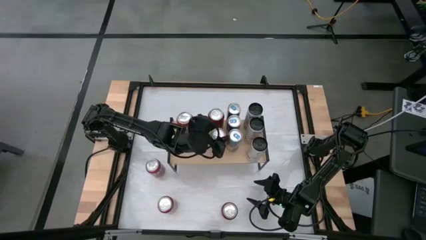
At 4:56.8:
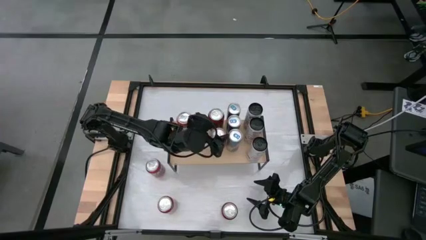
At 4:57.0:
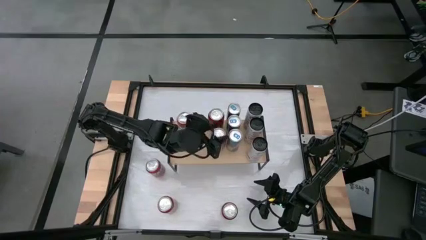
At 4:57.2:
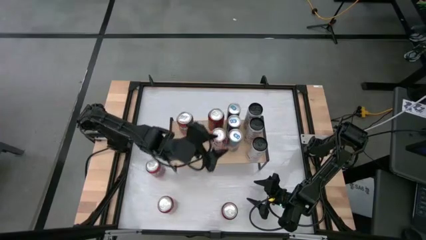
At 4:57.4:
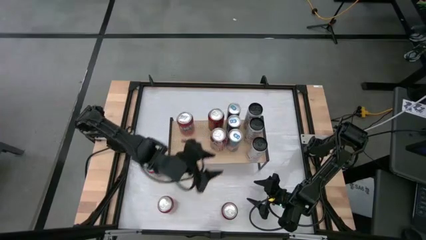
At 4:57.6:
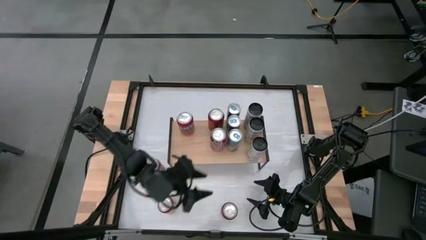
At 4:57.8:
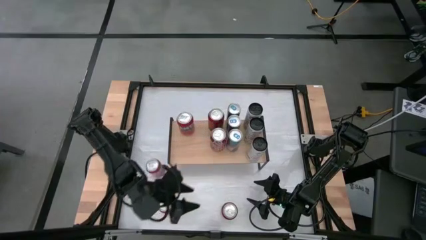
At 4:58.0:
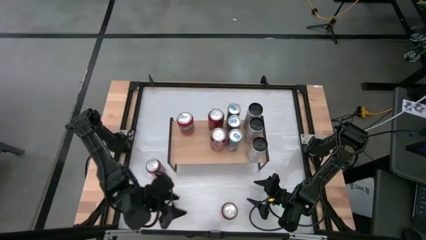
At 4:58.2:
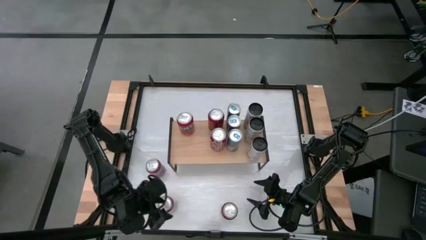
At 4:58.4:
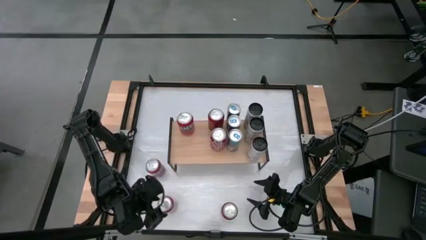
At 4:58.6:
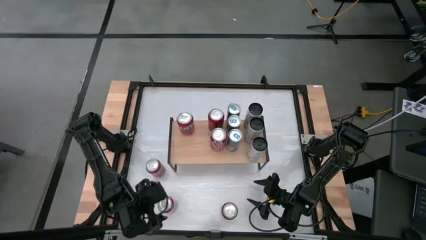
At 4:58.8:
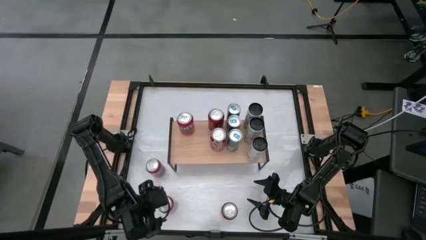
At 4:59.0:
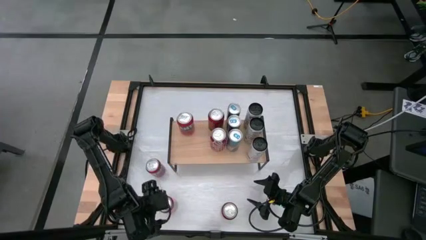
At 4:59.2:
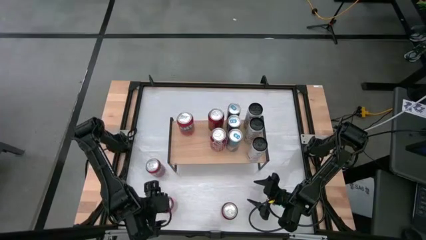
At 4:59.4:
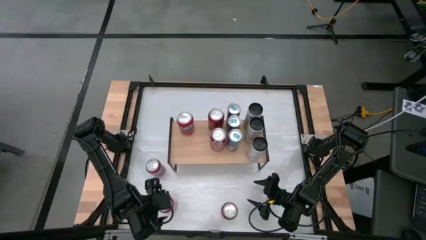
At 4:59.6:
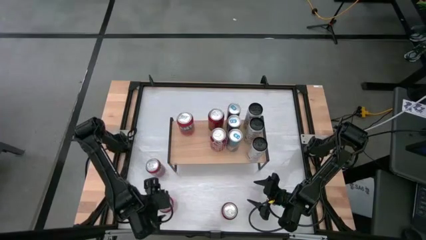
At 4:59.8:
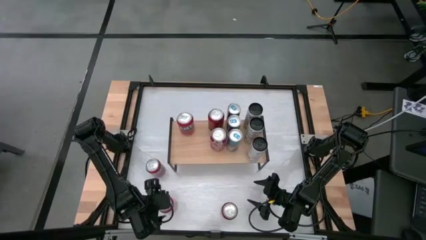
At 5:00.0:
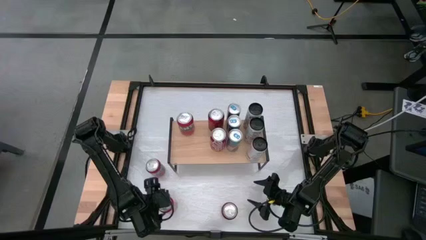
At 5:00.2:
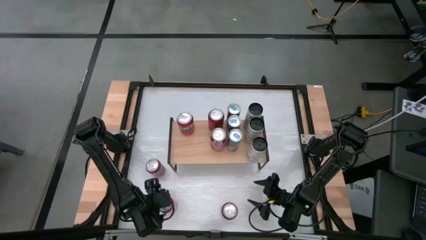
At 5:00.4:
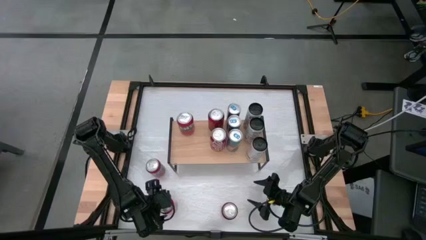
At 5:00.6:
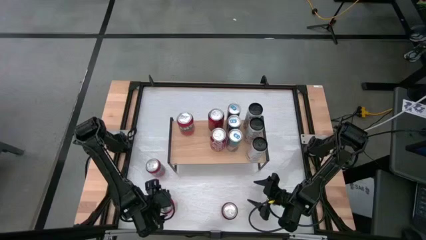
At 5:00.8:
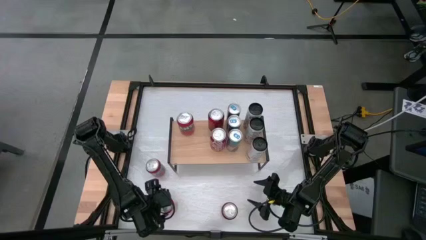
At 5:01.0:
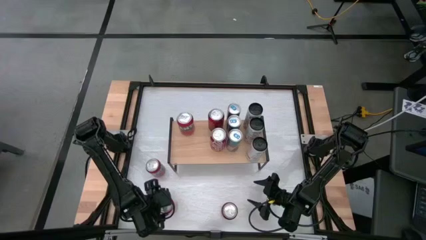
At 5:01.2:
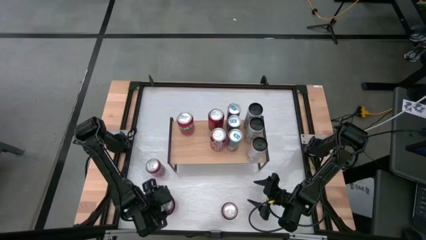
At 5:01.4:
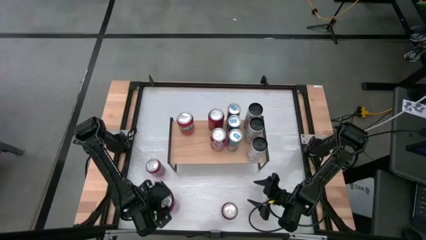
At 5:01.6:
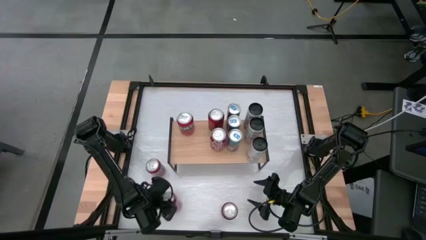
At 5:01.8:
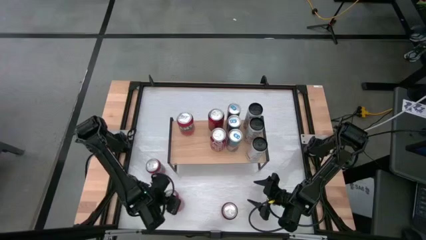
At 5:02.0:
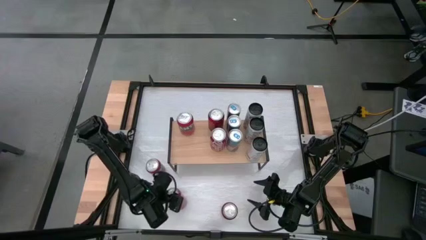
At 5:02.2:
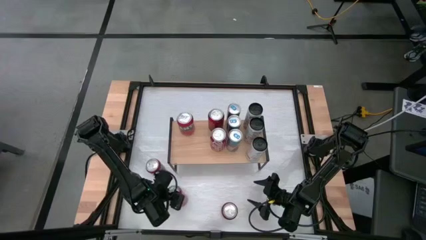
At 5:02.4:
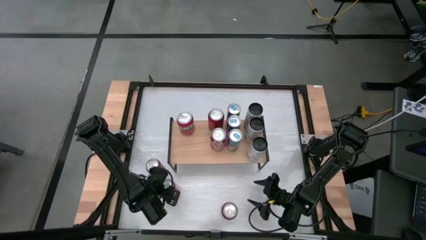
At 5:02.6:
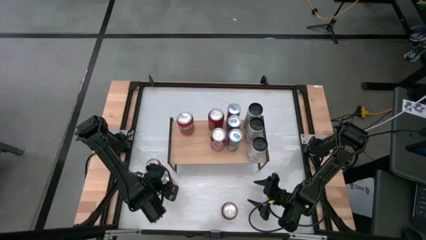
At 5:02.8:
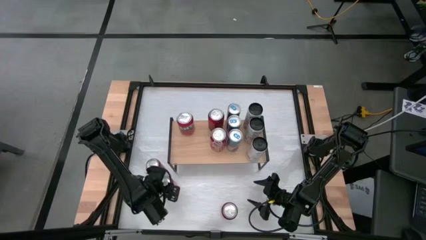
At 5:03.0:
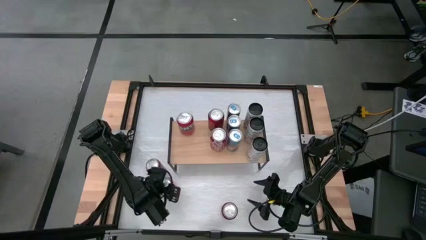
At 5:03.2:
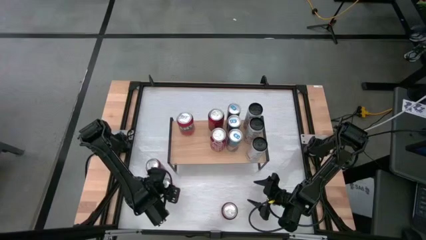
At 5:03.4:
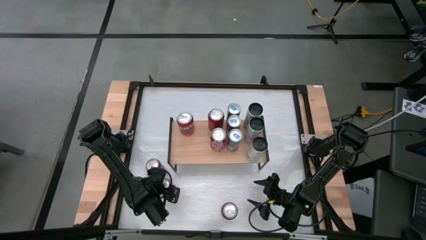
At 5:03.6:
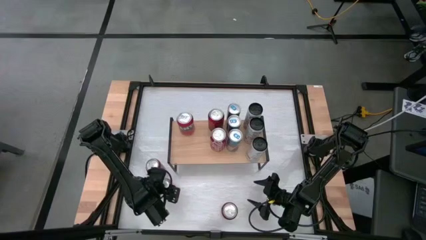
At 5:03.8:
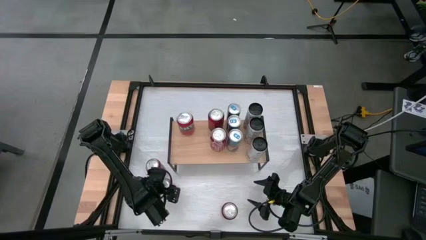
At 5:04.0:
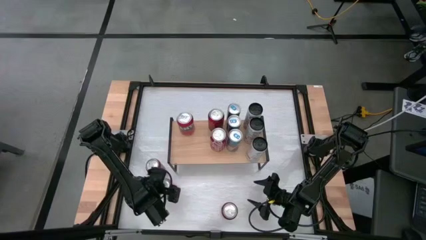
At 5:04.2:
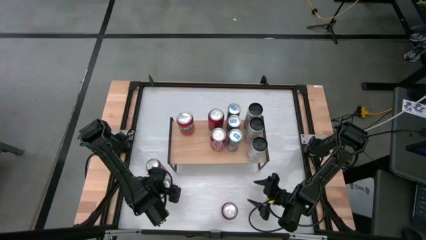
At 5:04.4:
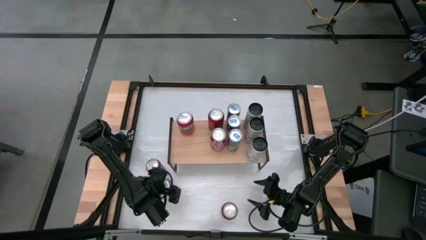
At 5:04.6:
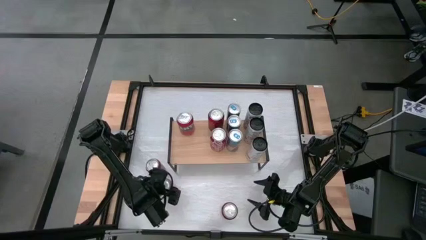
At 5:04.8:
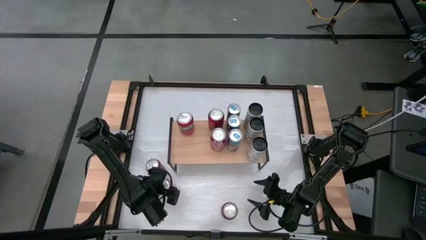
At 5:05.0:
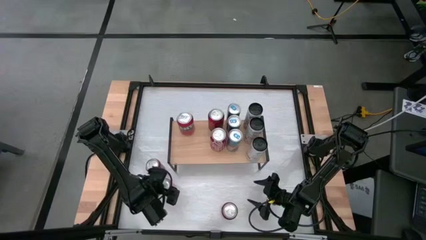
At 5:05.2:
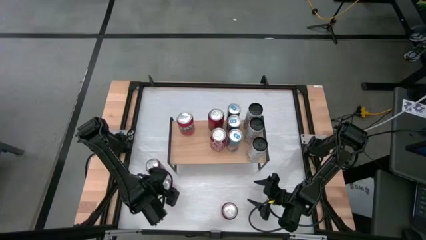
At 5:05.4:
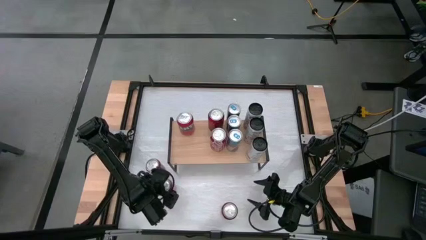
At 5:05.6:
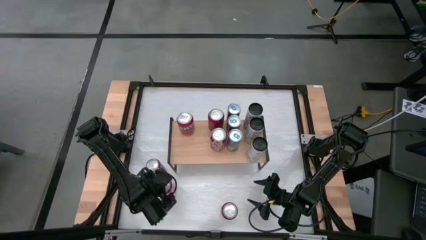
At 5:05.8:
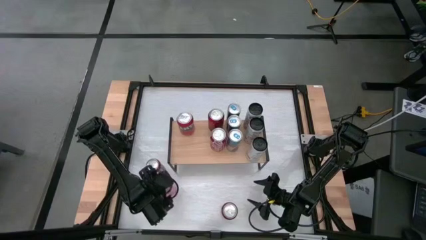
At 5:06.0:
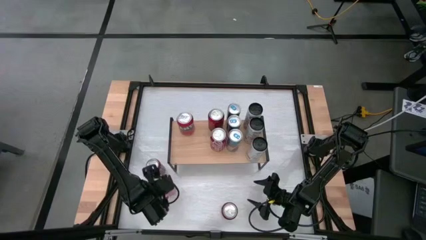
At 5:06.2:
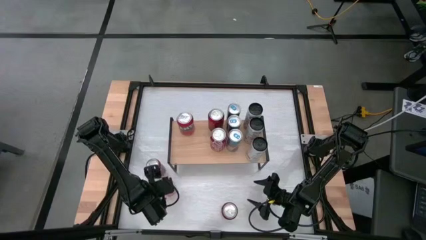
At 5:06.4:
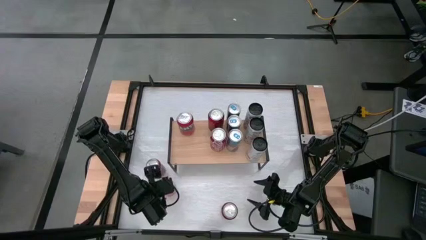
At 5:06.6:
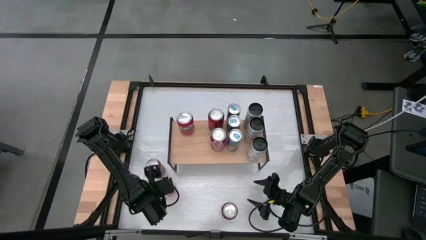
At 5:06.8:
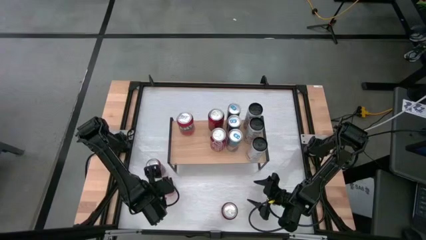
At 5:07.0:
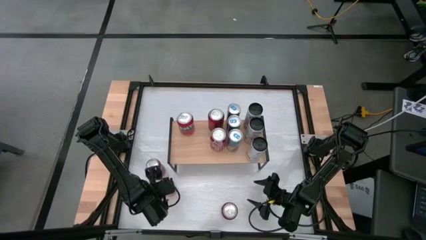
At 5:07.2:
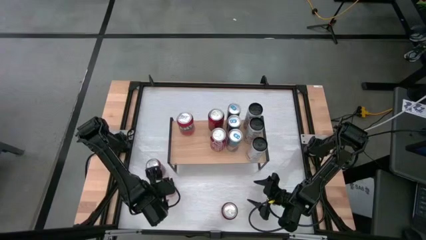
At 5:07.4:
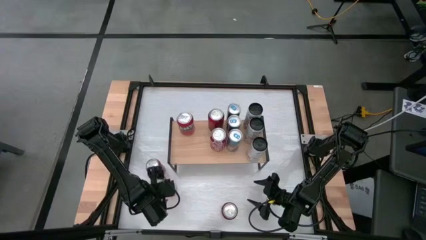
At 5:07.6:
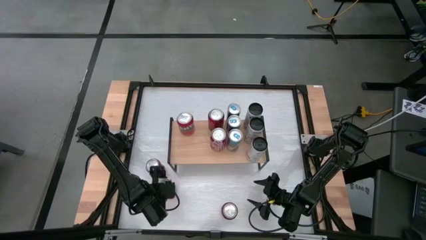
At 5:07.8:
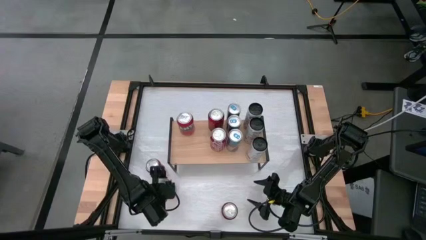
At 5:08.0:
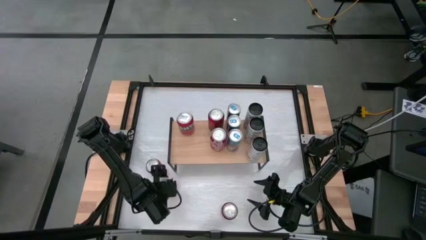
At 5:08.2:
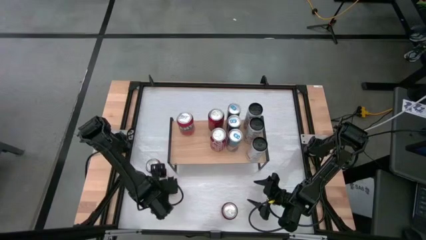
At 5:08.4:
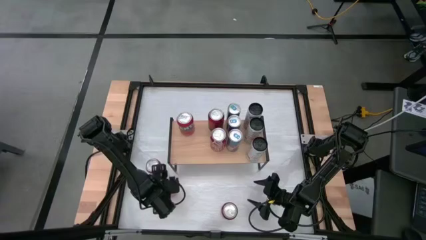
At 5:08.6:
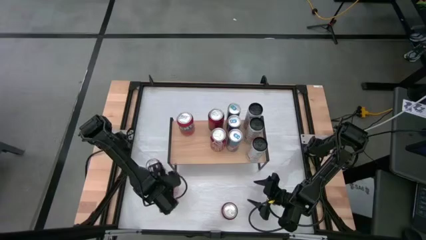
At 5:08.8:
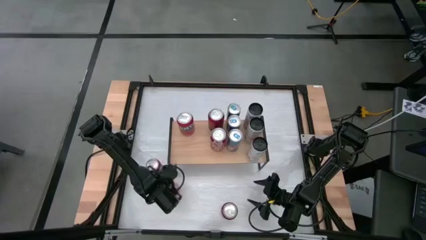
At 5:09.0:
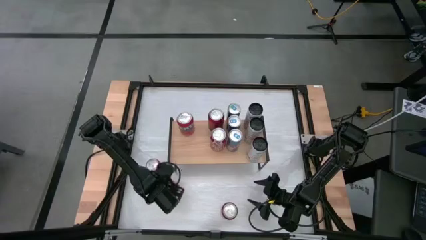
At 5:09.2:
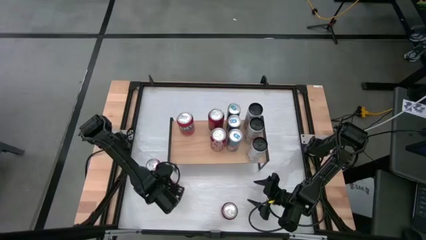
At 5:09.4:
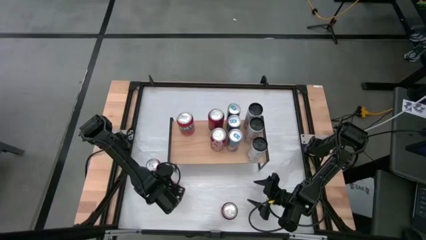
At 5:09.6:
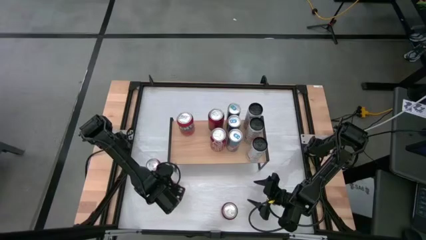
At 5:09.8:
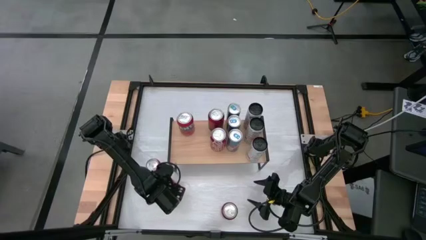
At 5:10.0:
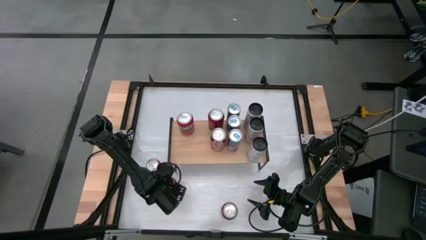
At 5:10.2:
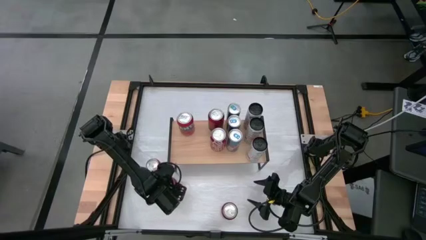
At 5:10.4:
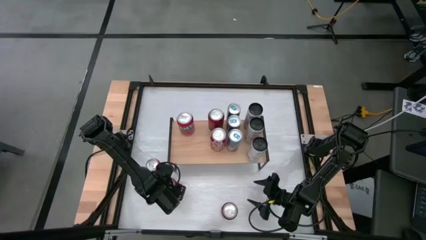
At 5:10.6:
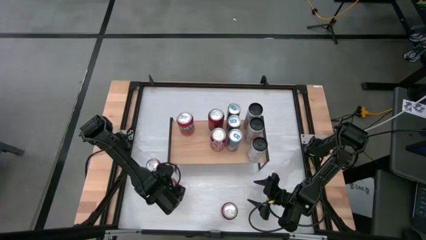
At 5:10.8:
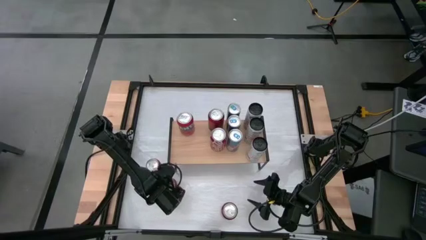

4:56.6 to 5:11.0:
Task: Place canned beverage on shelf
Put the bottom red soda can on the shelf aligned with the other red soda can

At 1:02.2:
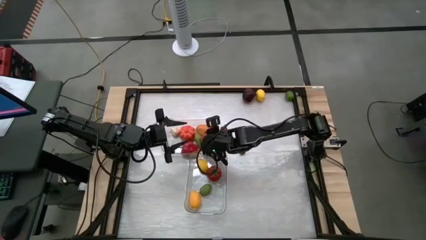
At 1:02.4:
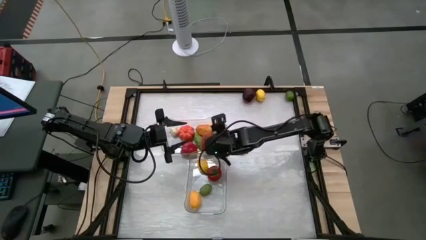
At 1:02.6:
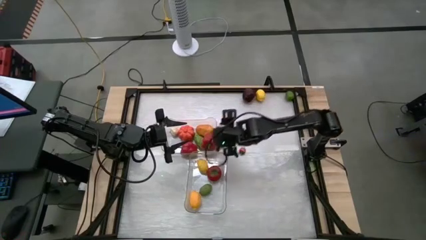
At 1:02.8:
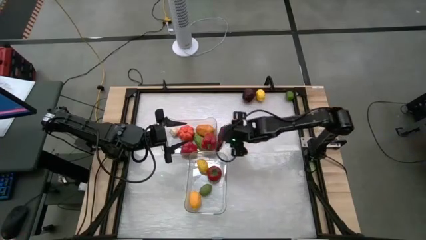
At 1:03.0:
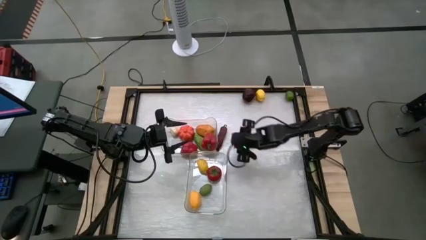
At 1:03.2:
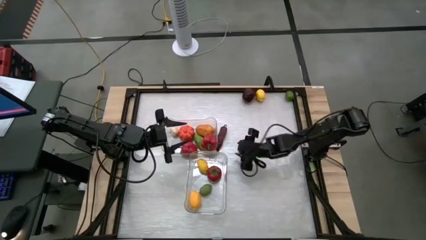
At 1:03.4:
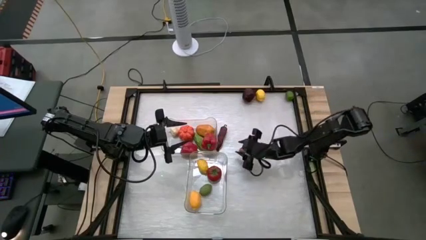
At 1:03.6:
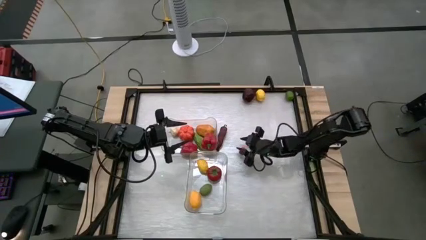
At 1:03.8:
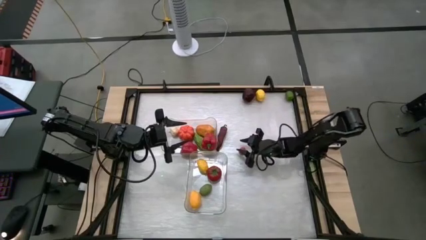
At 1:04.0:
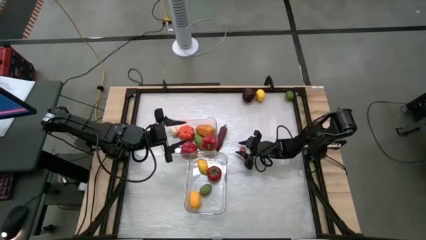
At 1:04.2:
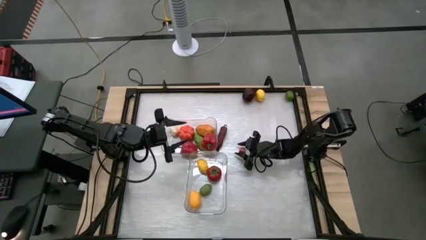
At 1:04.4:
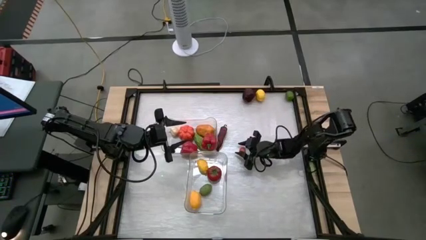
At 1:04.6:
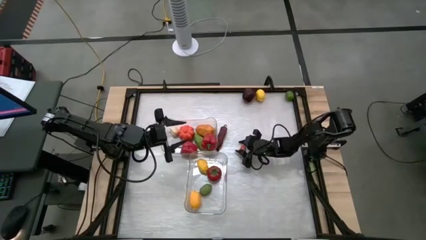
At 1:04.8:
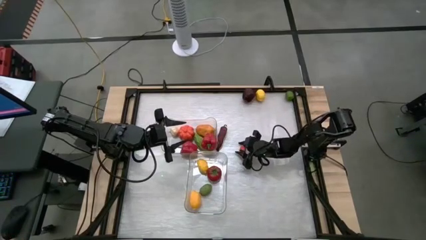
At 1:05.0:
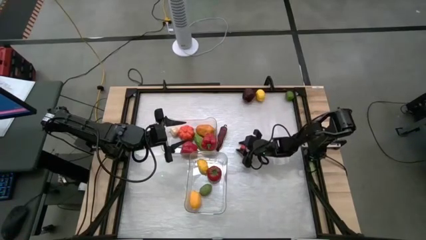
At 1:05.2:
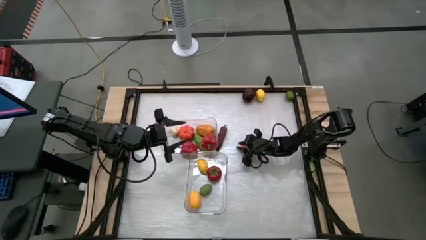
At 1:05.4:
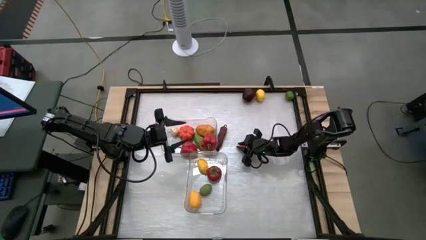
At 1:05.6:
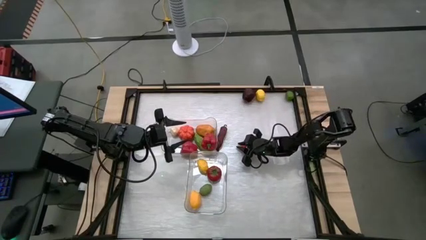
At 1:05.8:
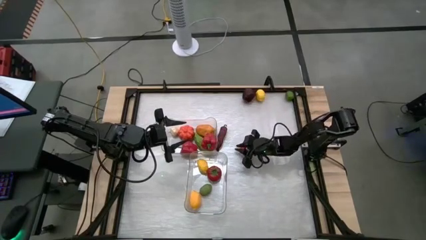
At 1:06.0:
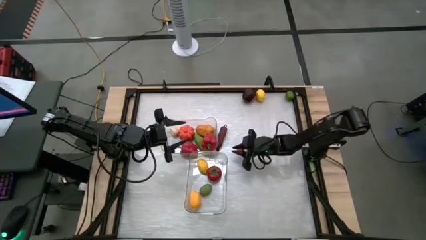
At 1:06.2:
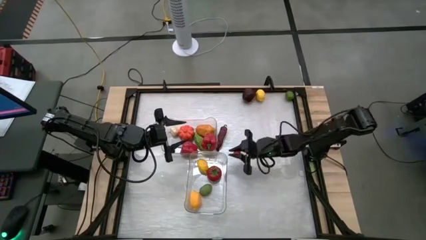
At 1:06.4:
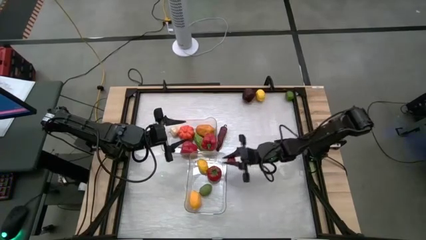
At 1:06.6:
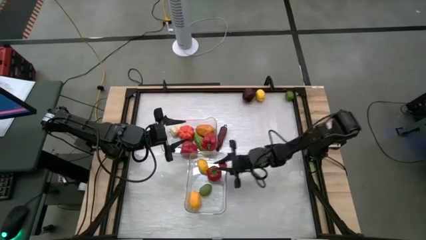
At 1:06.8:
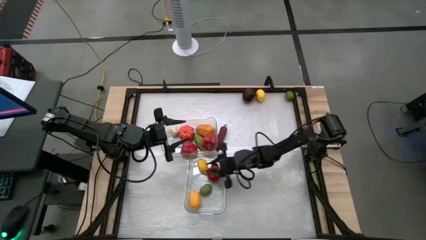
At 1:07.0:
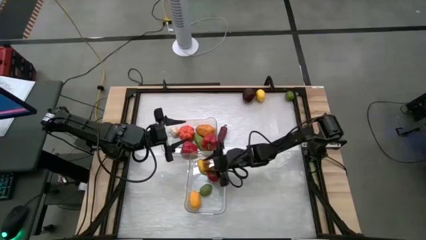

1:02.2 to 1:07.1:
Task: Sort produce into baskets
Put the tomato into the bottom transparent bin
